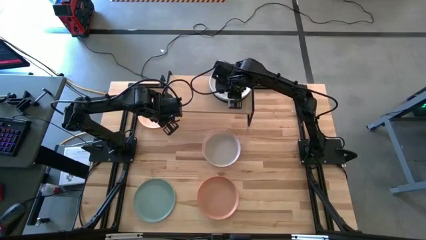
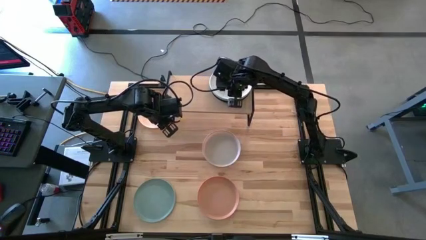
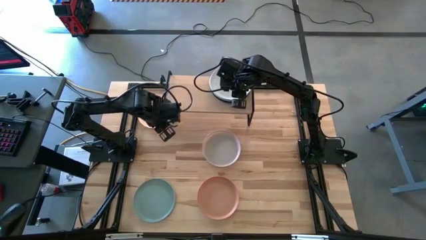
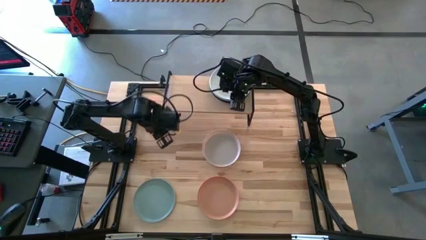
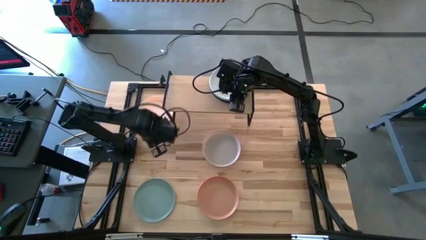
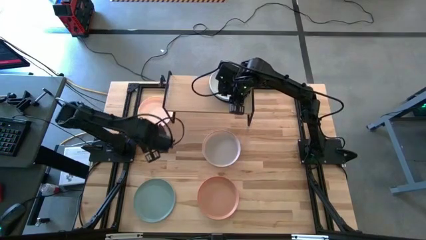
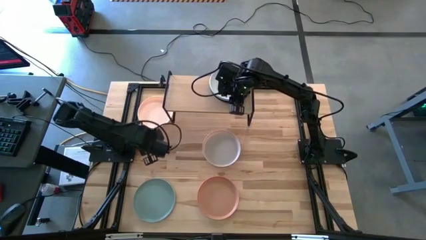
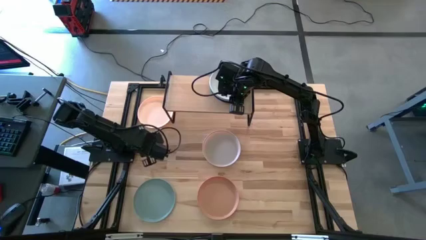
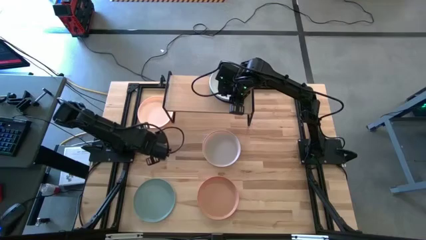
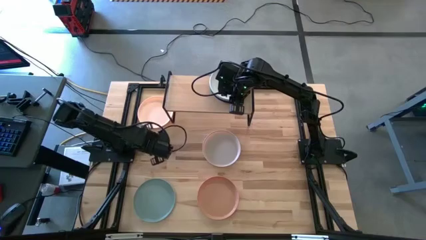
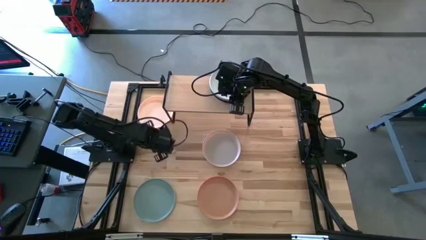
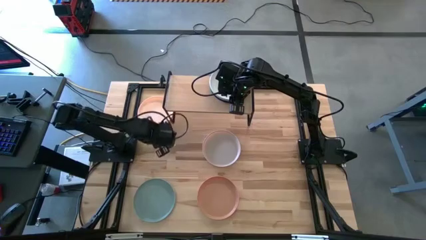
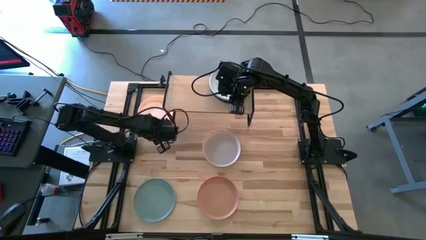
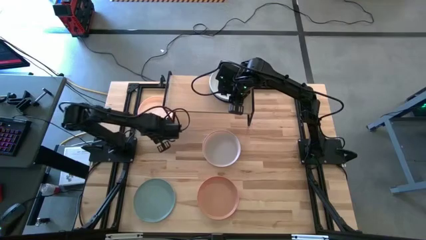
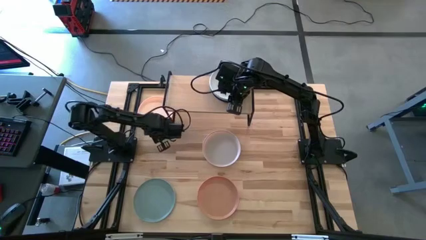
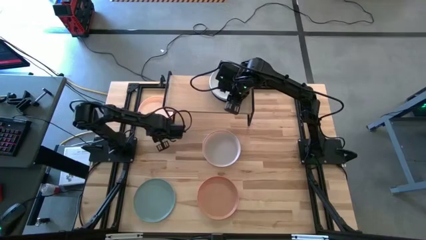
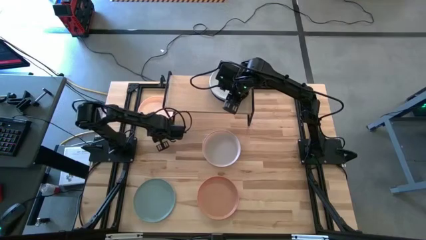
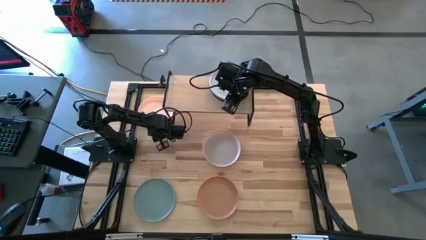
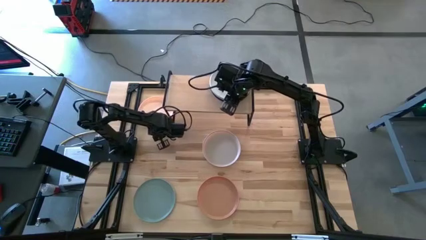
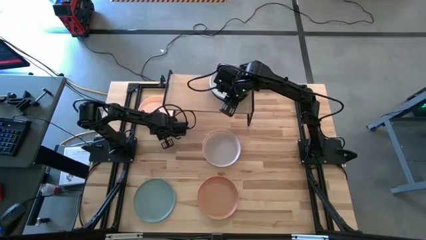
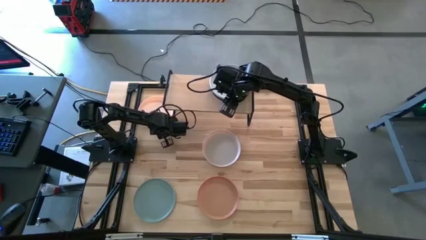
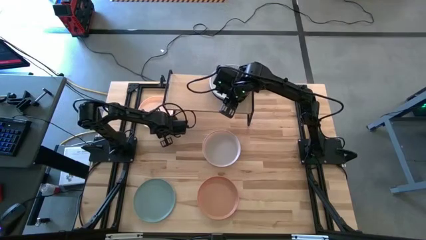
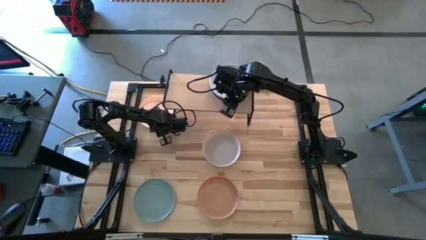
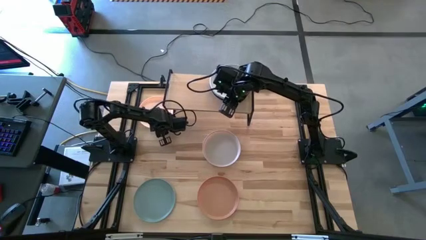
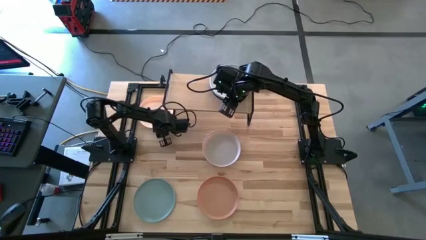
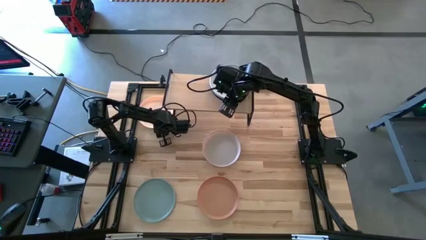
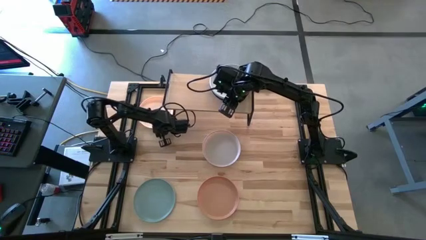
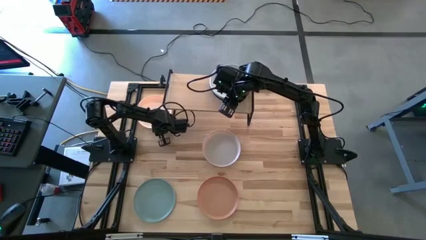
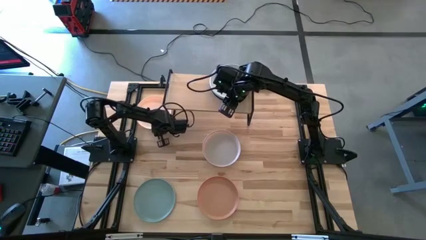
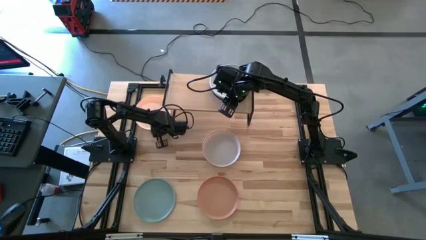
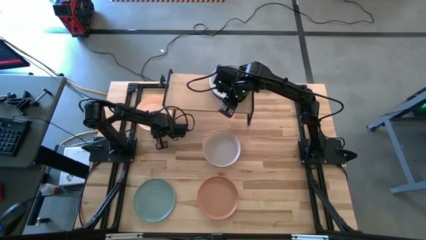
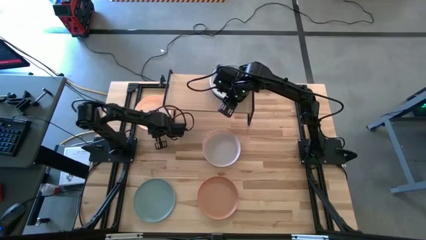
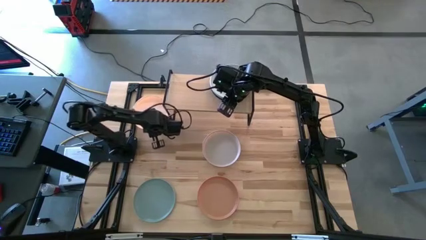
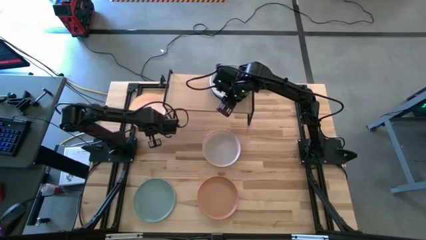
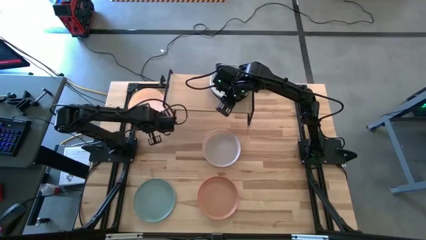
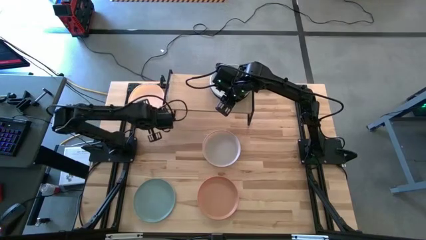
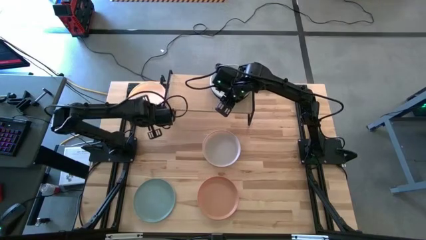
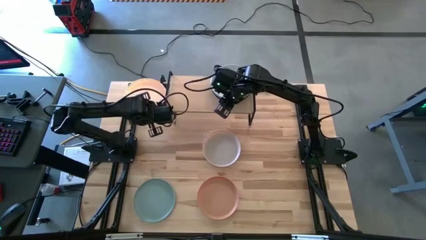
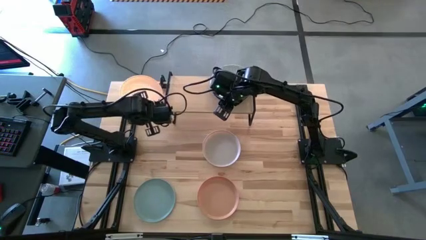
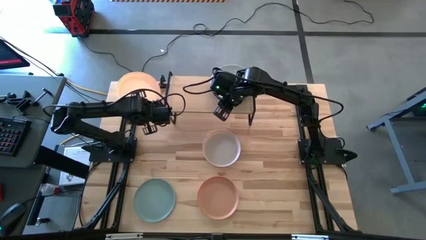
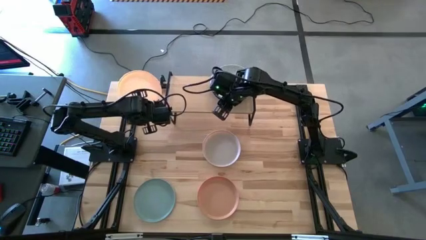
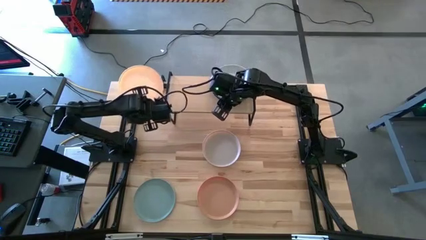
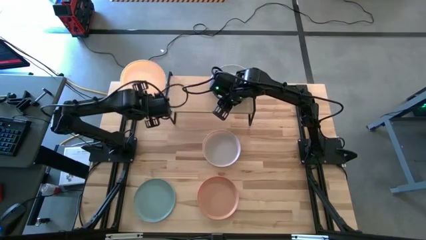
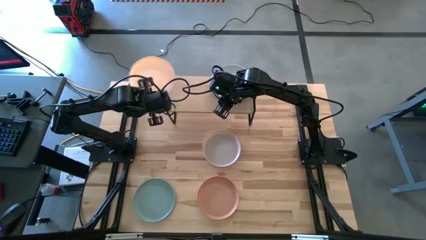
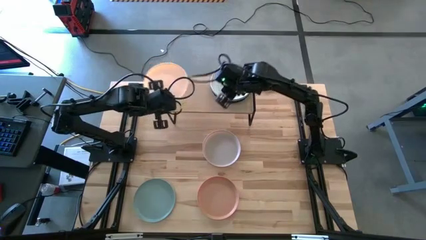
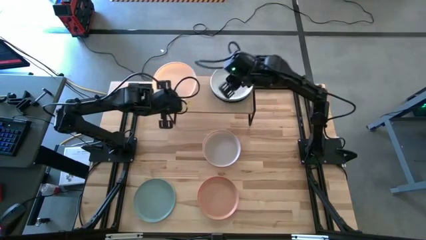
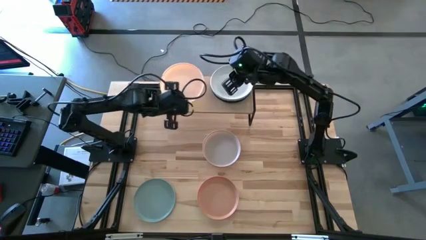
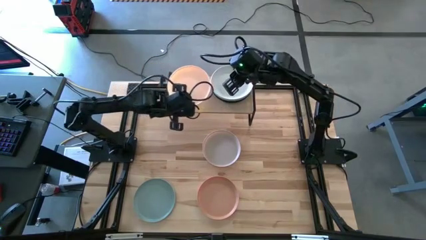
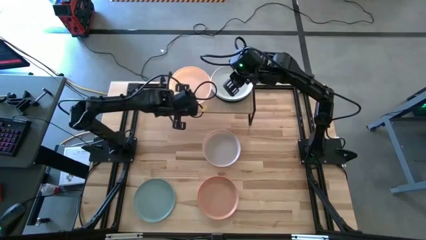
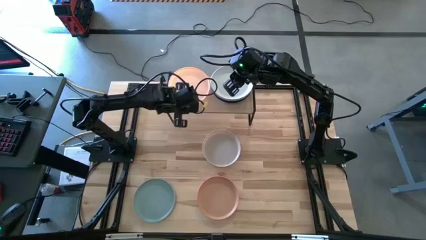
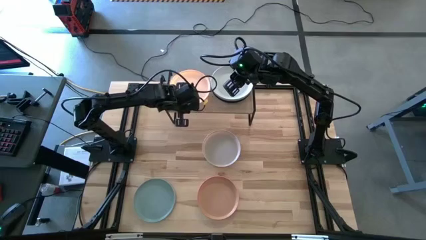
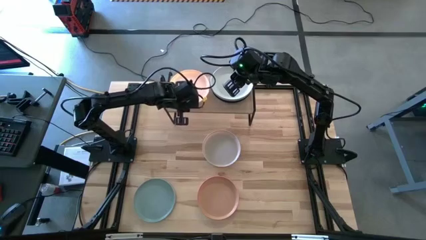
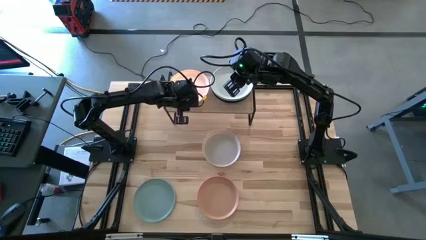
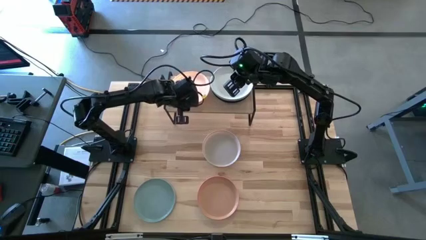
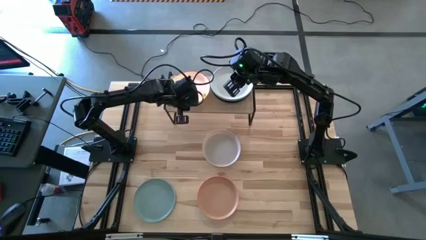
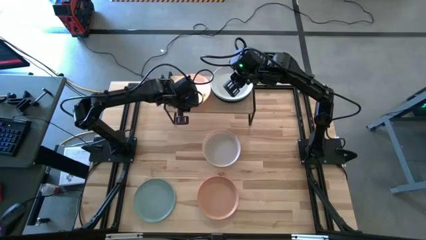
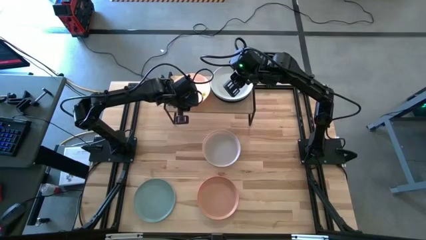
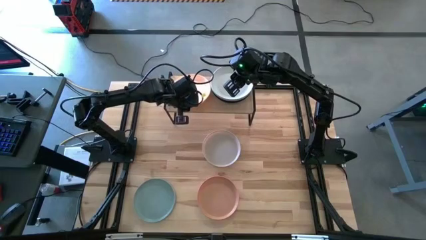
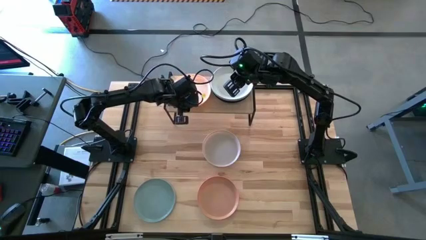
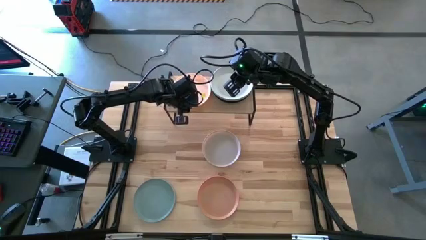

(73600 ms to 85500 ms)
Task: Place and stack plates onto a shelf
Put the light red plate on the shelf
